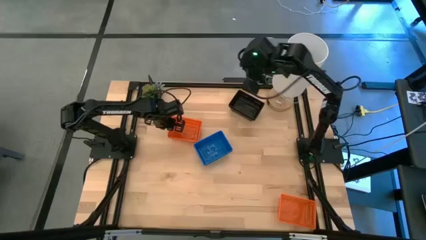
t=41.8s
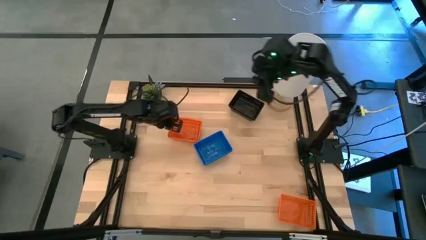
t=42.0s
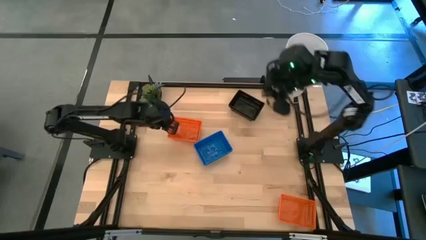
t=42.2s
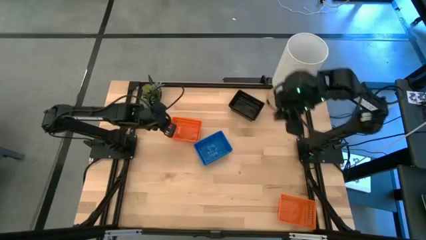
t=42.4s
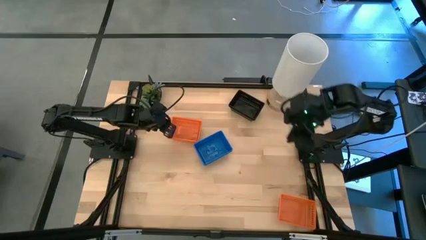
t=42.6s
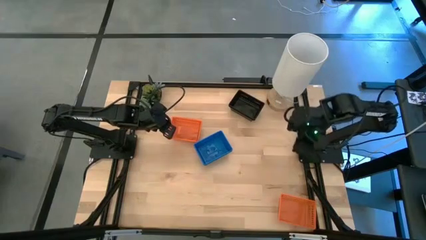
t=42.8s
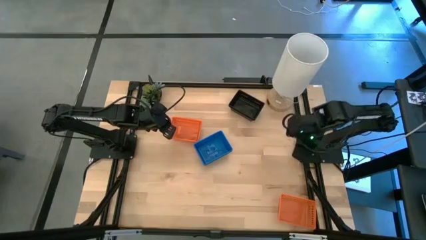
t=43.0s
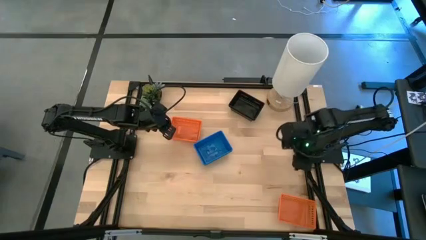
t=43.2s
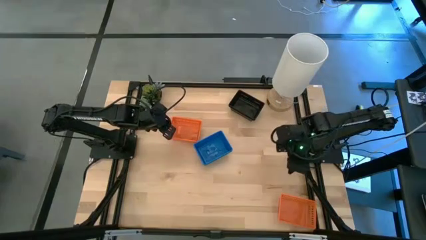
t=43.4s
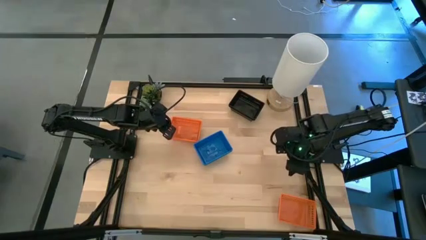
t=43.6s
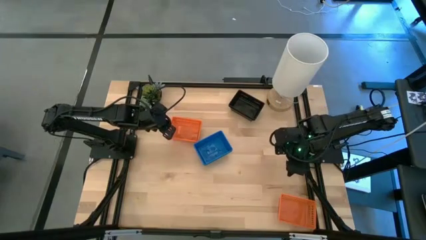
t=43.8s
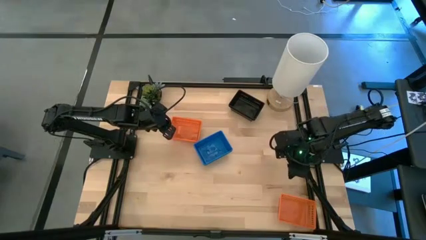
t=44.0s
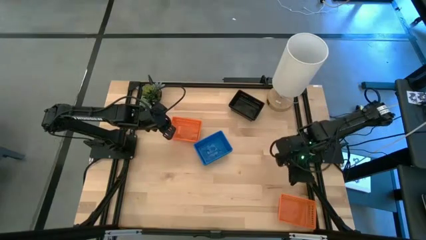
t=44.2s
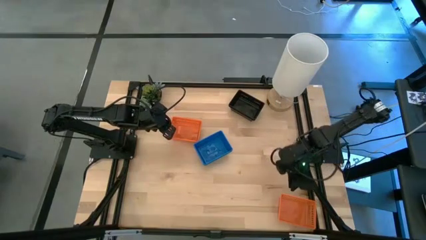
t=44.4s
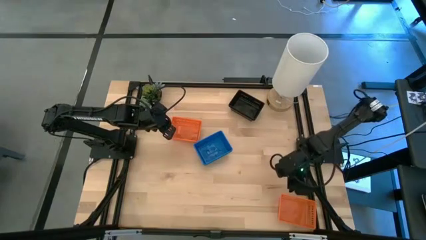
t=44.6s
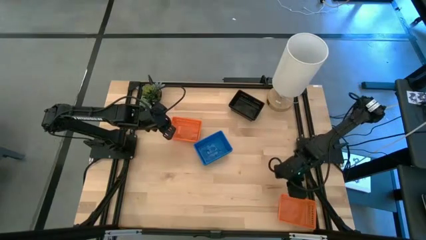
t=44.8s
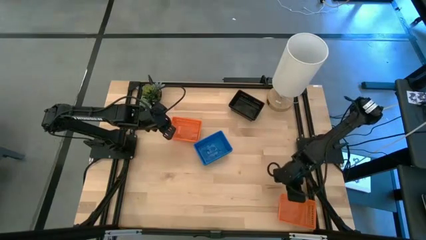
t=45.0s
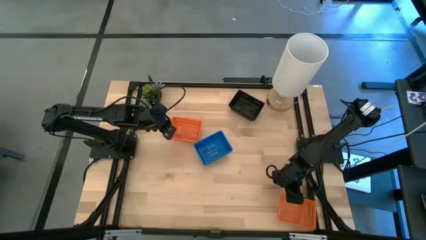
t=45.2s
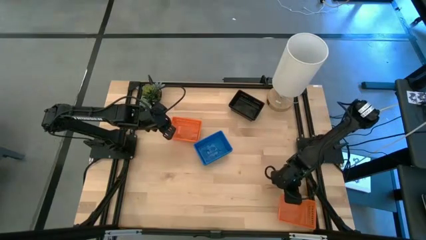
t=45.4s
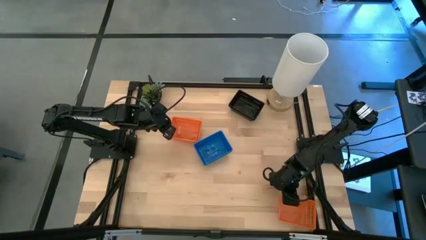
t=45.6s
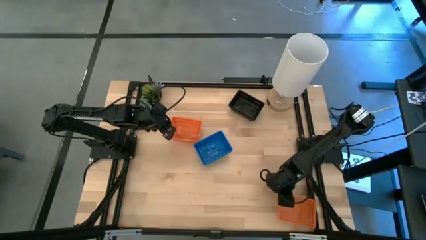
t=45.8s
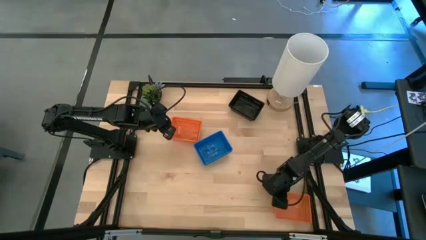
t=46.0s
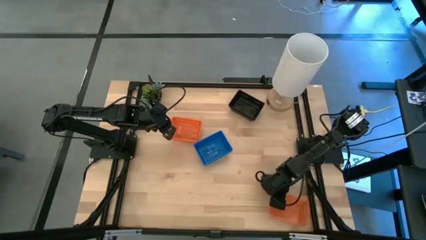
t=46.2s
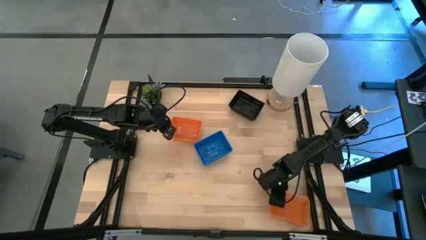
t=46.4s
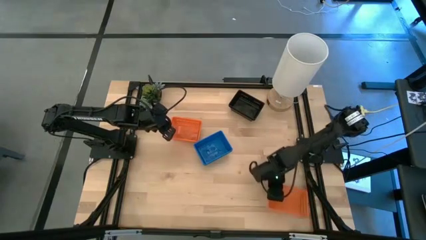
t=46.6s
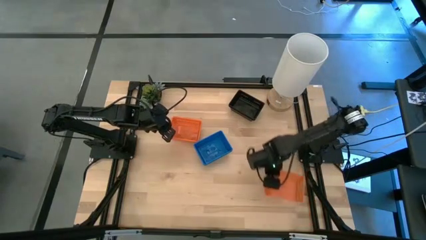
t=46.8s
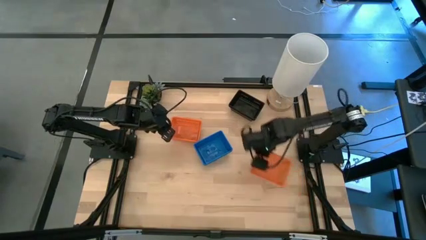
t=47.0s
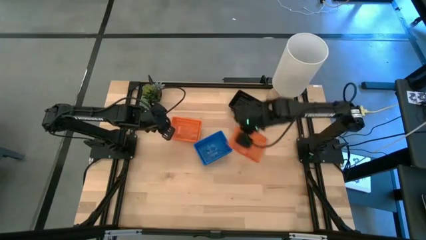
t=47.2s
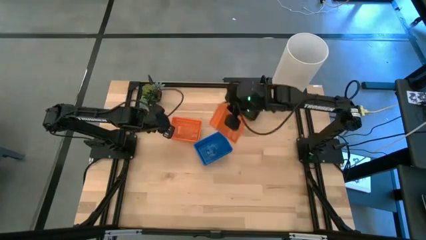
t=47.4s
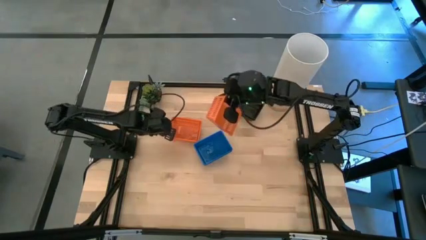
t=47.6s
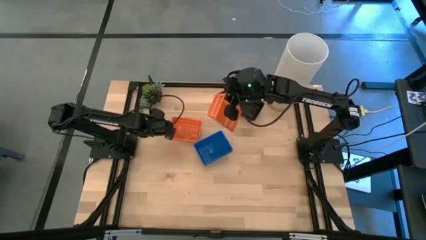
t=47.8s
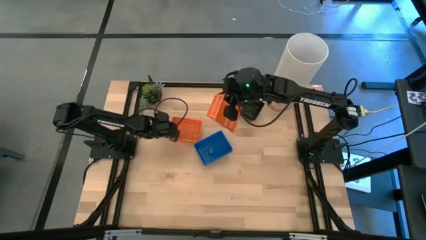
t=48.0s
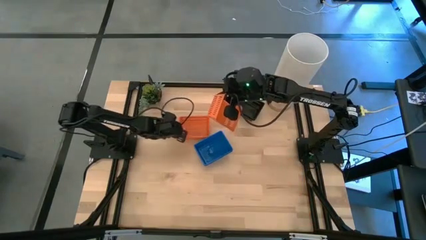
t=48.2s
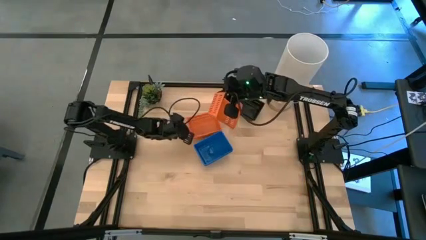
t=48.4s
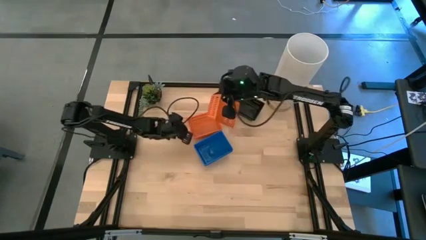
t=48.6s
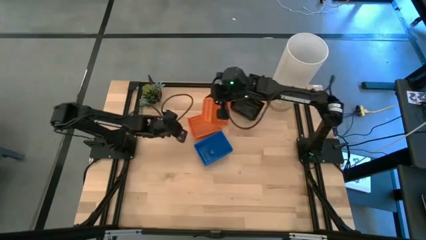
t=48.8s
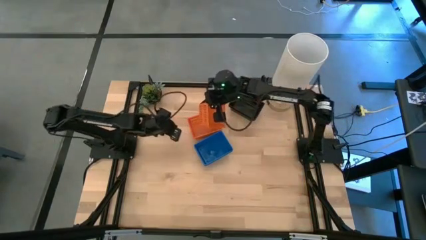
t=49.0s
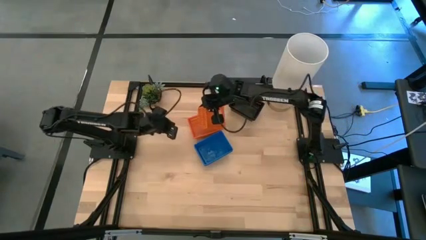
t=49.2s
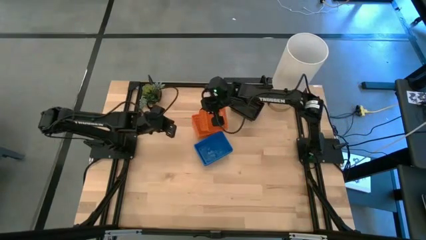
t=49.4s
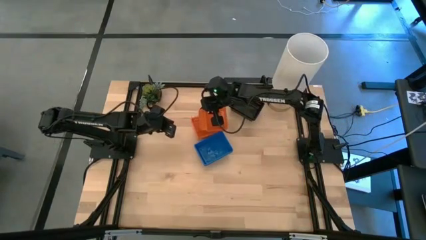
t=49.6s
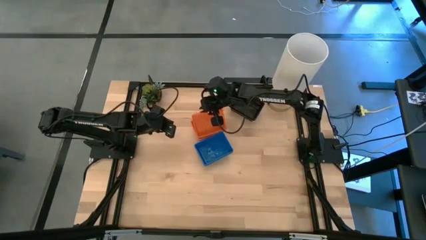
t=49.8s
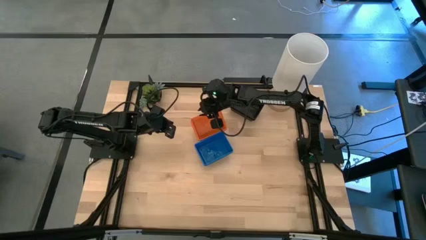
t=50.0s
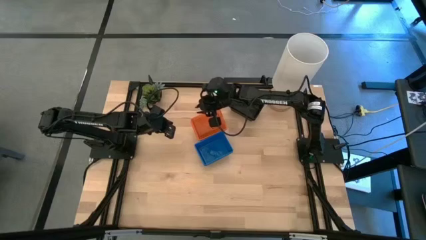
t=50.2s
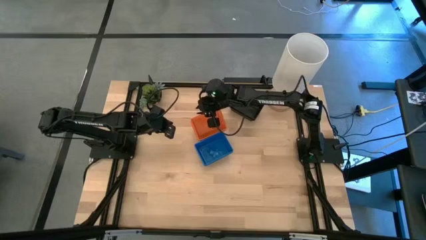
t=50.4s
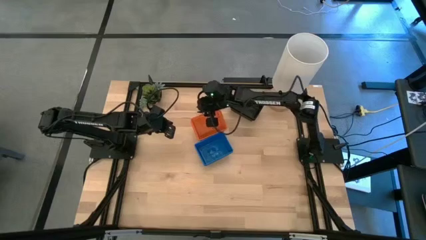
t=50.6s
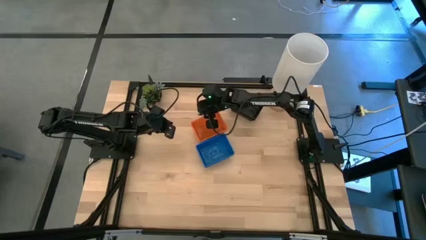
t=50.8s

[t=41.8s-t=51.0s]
Stack the bottom orange bin on the top orange bins

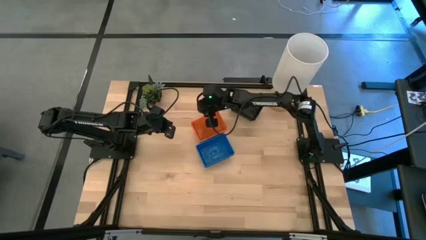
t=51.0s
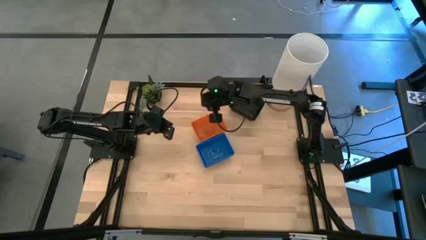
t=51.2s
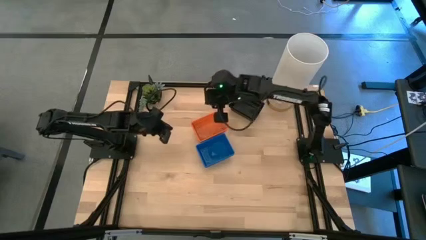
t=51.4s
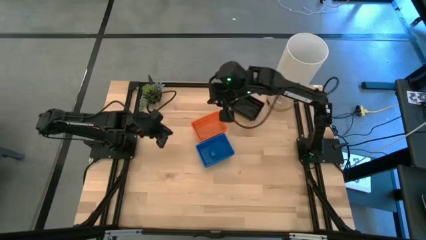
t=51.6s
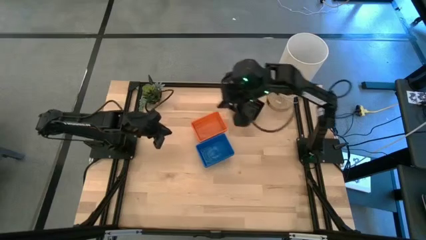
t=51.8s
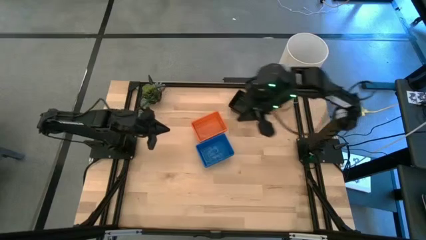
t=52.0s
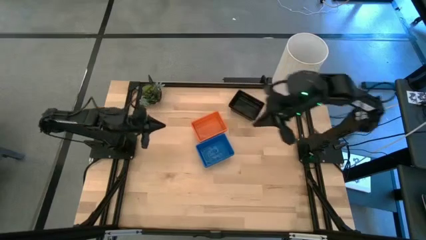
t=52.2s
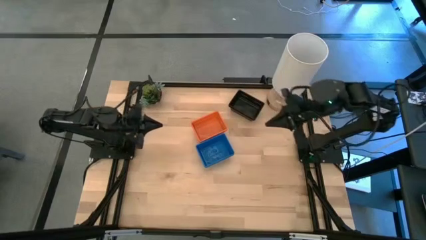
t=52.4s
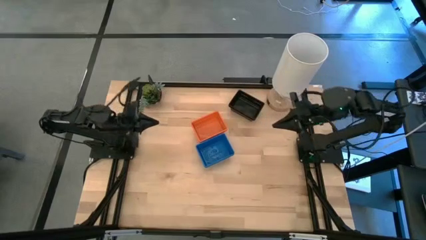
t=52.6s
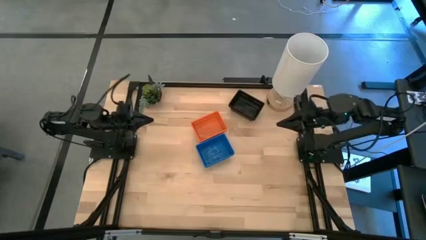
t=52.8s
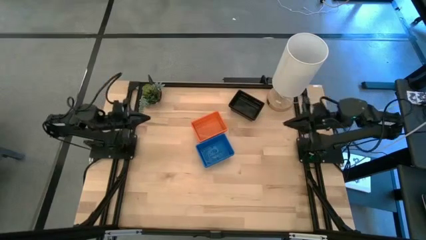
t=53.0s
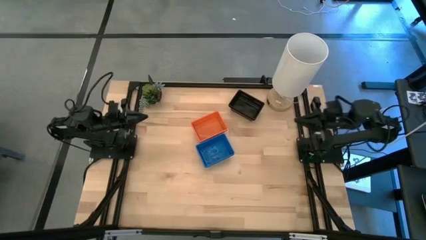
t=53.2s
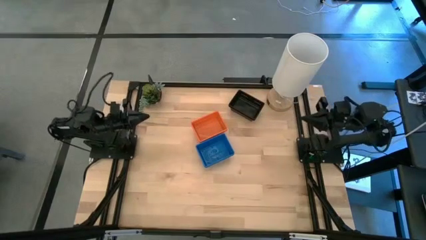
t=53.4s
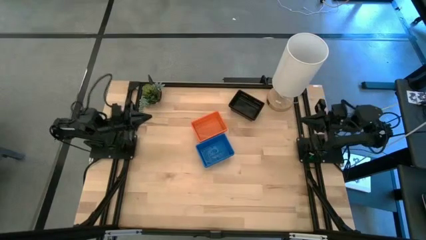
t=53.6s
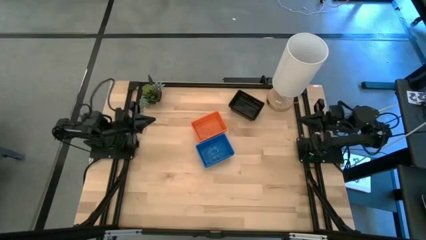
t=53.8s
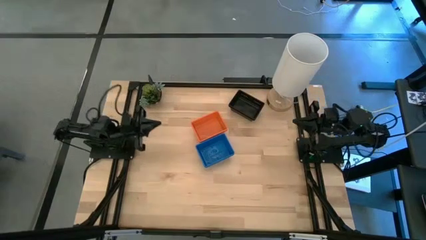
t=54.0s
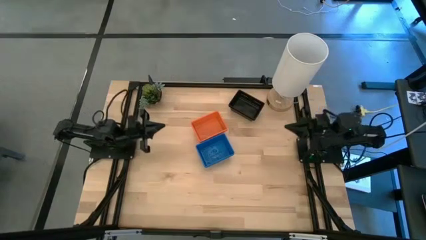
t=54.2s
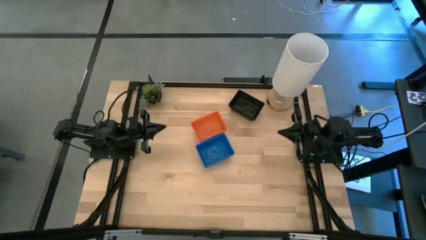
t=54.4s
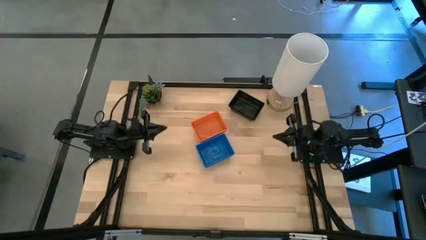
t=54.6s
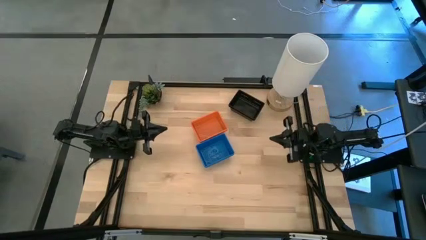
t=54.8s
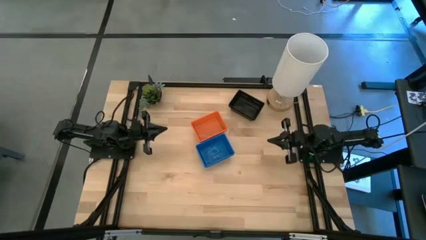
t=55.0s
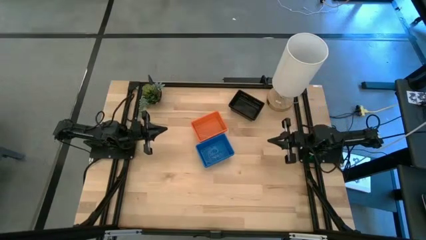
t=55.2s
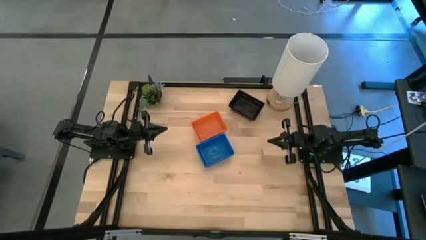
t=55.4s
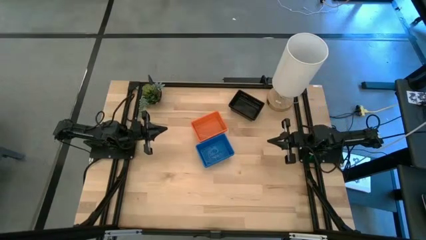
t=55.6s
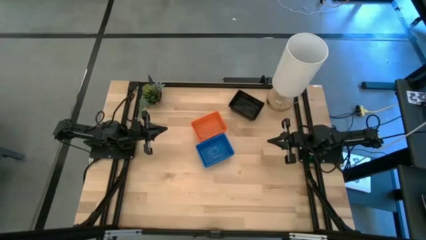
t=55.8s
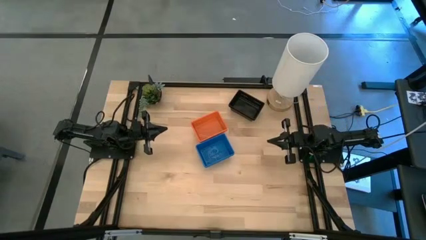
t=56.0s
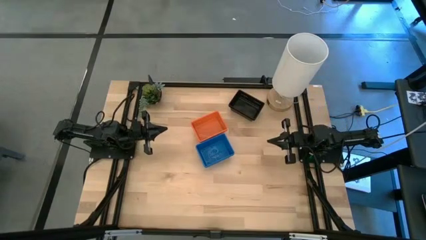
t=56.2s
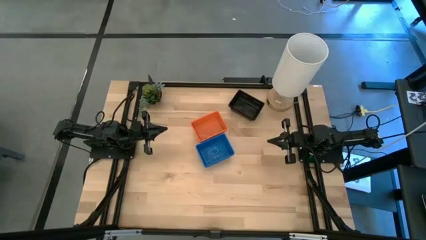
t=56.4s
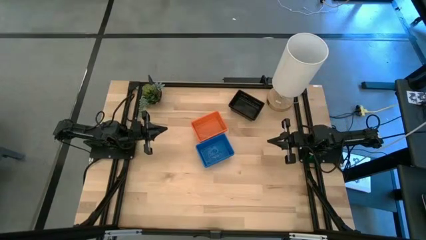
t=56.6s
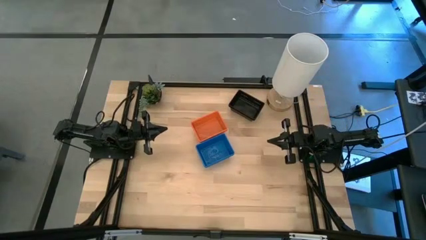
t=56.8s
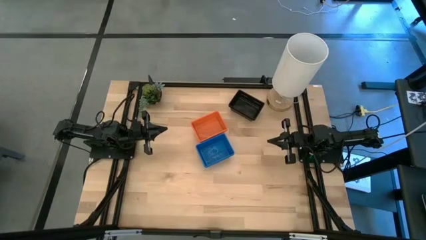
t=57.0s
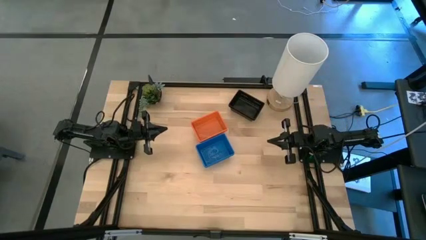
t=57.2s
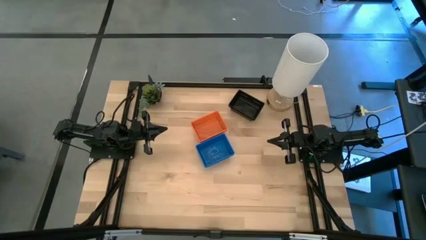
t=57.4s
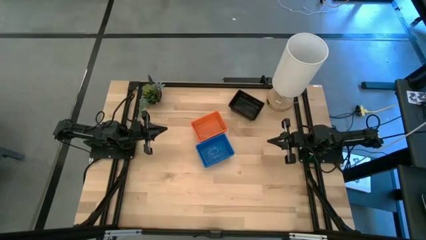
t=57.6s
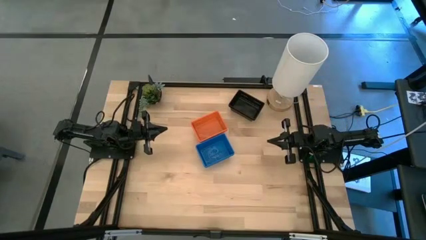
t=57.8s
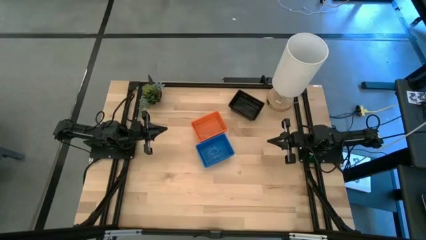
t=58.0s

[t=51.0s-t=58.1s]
Return to Home Position
